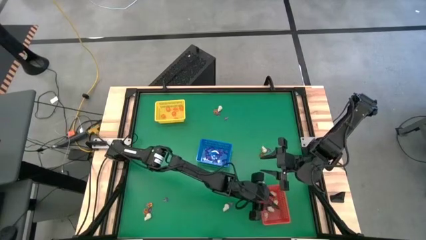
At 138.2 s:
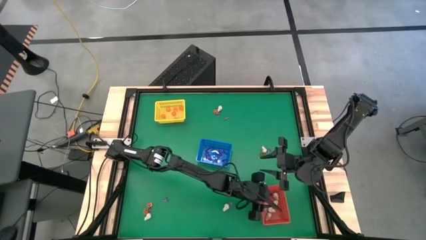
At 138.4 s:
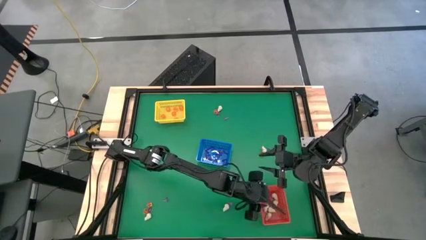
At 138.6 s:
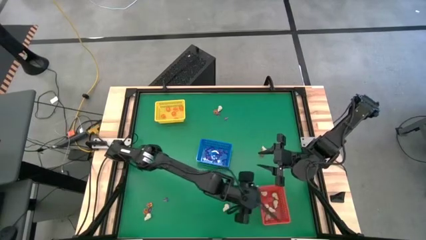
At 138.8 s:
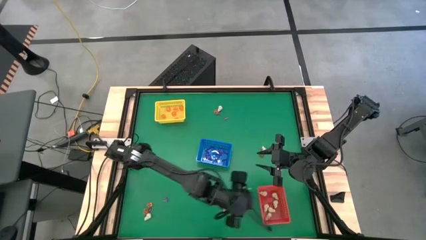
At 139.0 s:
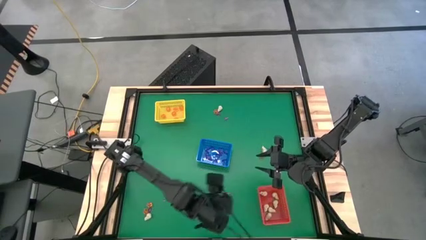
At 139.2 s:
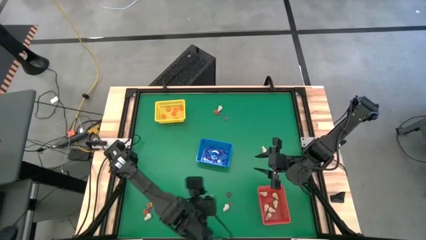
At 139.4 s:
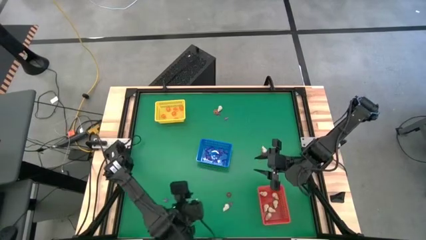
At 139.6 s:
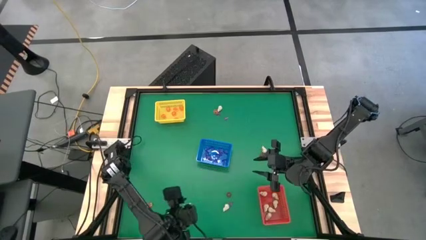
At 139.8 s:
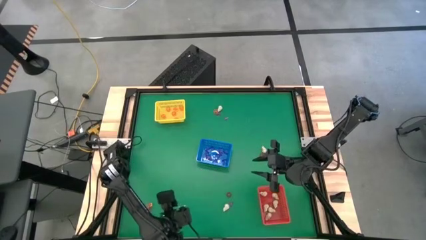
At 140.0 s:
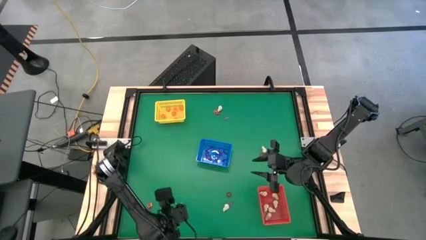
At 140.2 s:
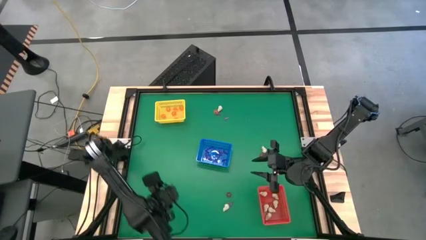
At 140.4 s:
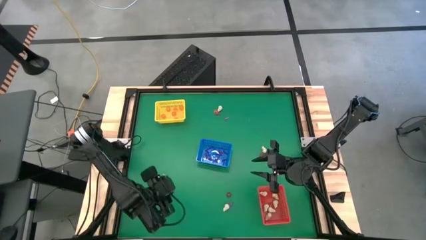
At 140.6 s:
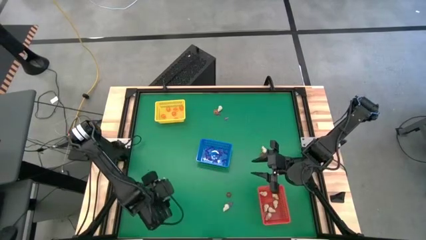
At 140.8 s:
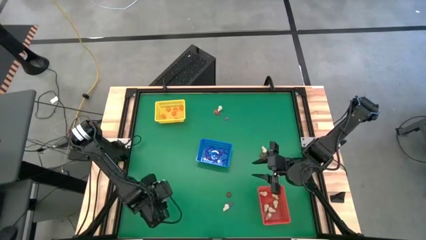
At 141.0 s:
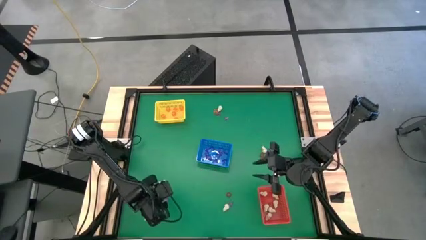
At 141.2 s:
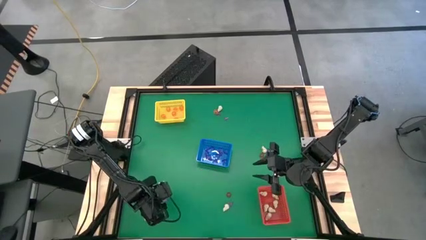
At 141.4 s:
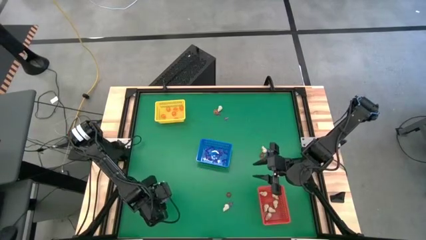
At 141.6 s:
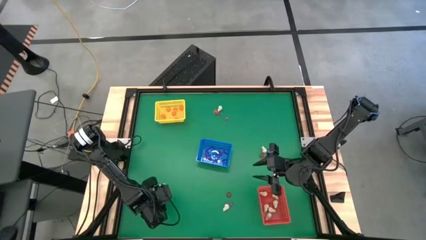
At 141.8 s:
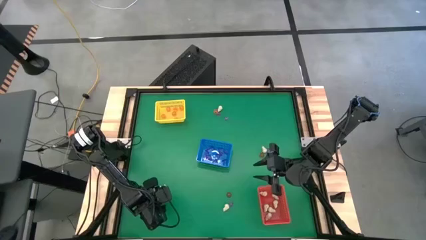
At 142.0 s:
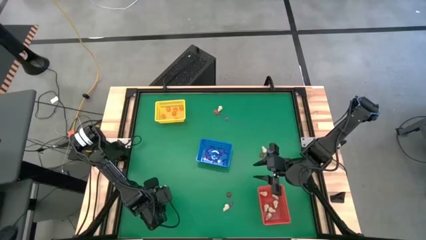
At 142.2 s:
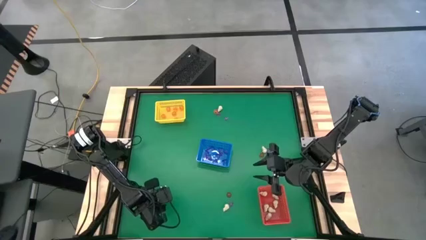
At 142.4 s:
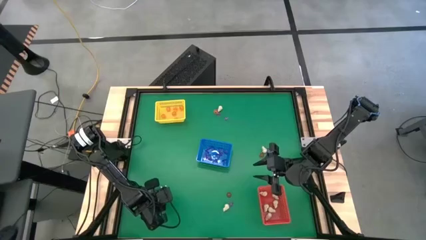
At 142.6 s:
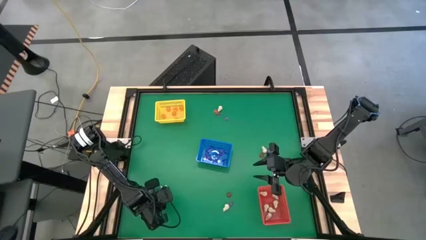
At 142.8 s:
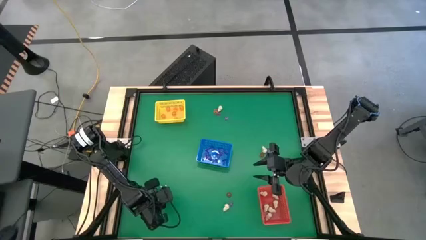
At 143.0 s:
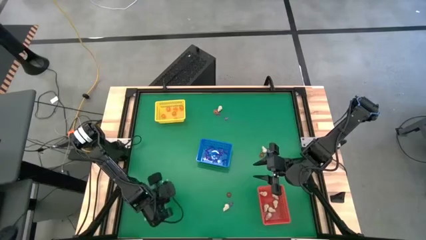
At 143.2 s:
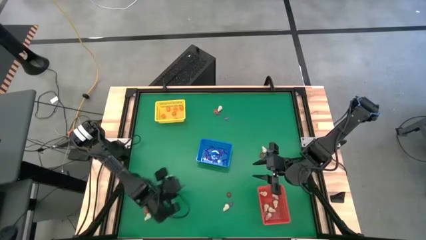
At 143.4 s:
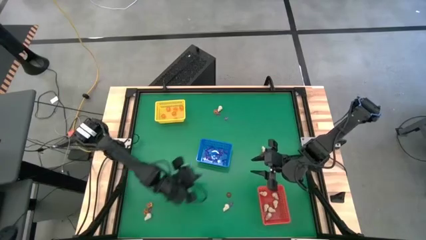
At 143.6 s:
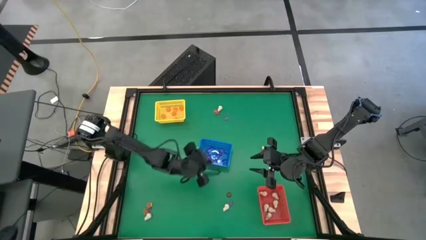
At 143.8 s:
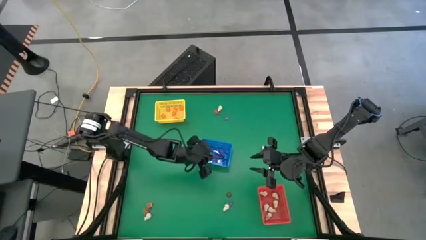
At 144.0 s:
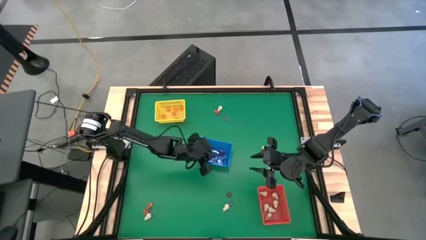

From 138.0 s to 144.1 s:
Task: Sort Halloween decoration
Put the witch hat toy into the blue bin

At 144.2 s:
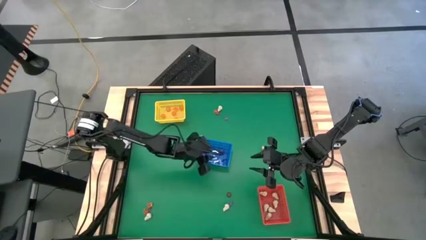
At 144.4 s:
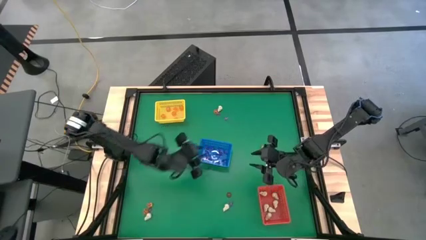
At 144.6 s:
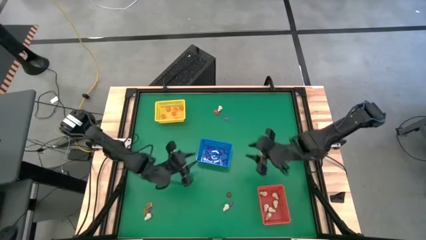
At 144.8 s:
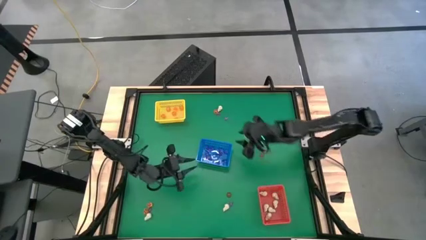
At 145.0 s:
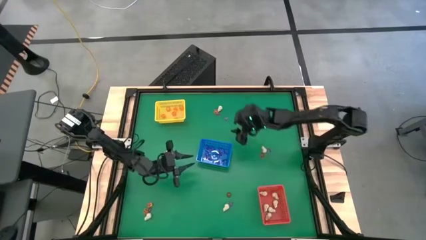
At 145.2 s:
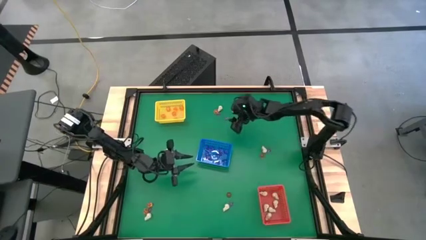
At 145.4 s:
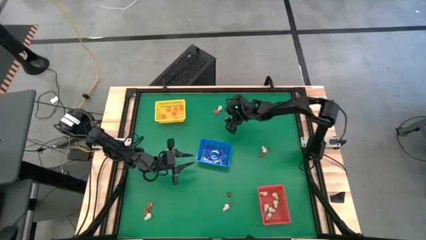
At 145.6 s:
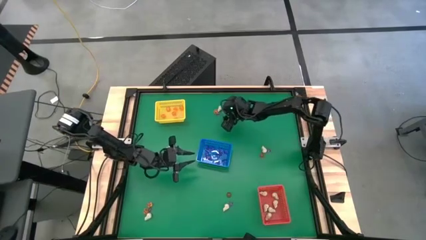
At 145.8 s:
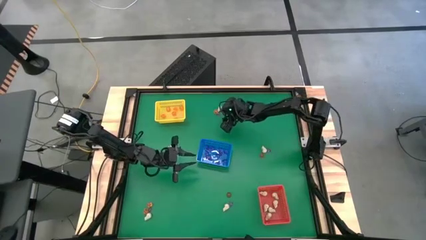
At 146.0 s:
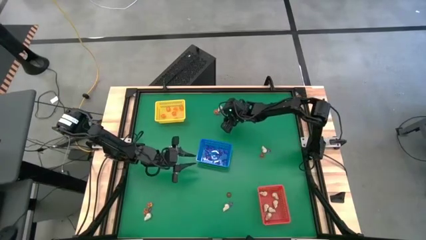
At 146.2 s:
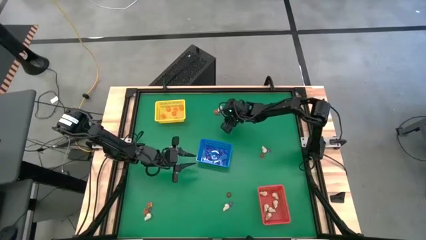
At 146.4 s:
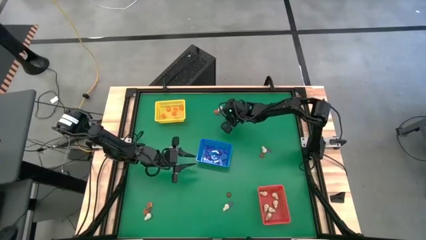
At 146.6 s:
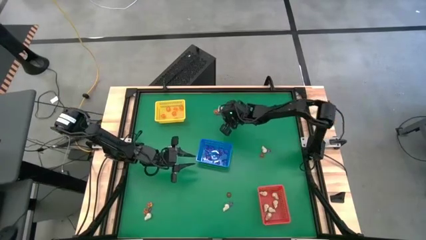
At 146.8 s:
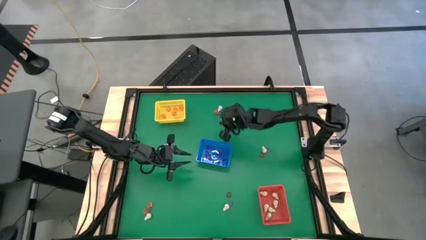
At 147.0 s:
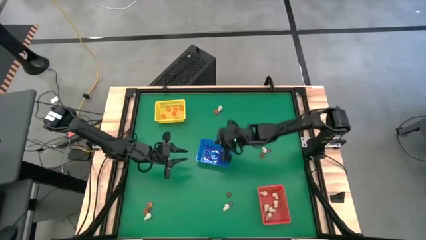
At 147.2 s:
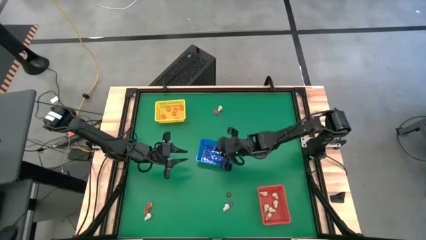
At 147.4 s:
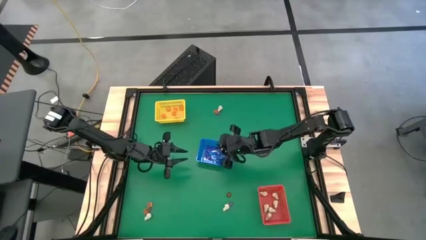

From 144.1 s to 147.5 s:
Put the witch hat toy into the blue bin

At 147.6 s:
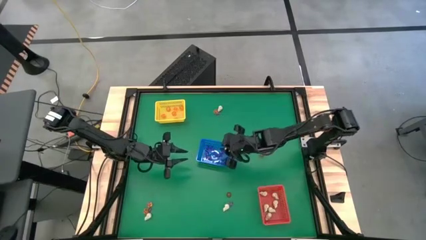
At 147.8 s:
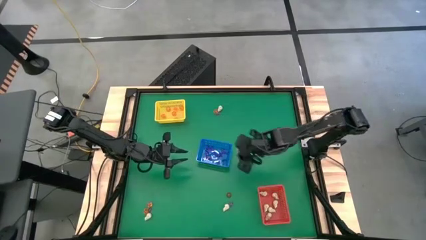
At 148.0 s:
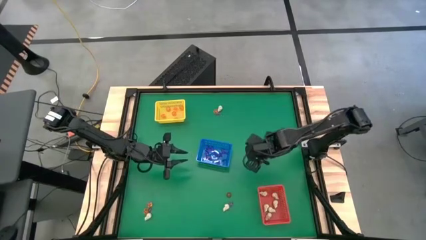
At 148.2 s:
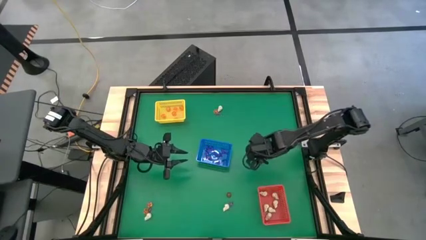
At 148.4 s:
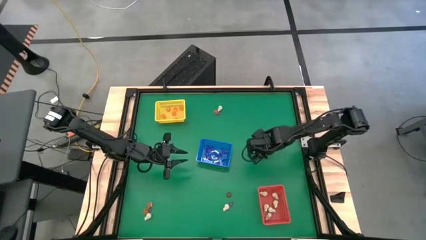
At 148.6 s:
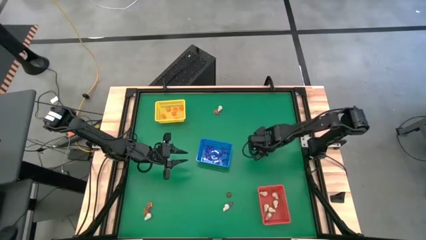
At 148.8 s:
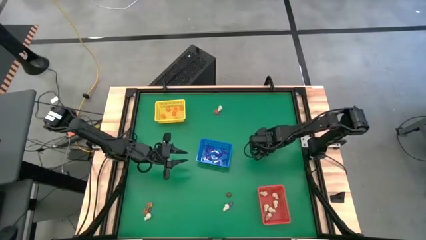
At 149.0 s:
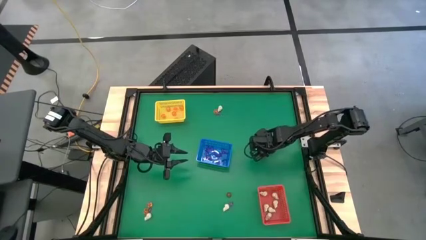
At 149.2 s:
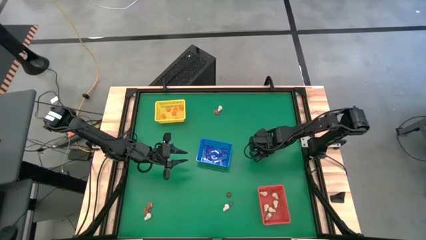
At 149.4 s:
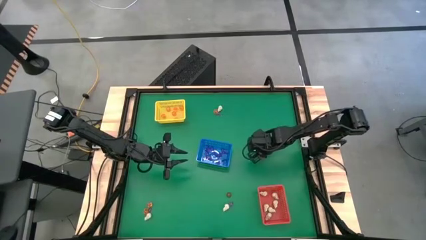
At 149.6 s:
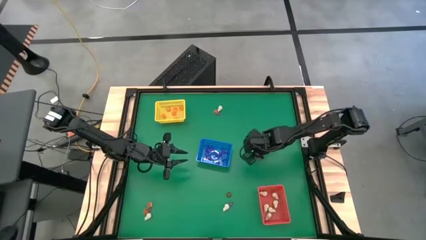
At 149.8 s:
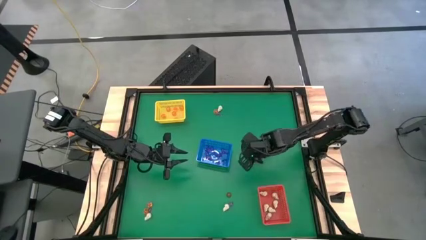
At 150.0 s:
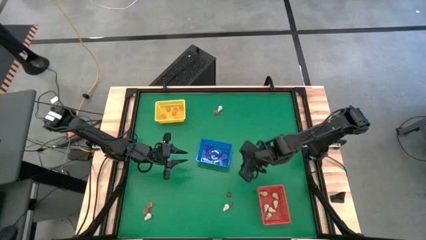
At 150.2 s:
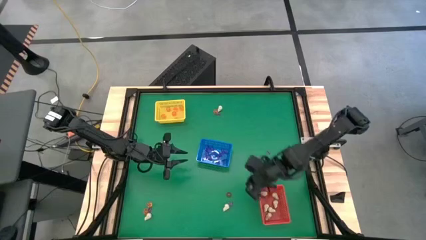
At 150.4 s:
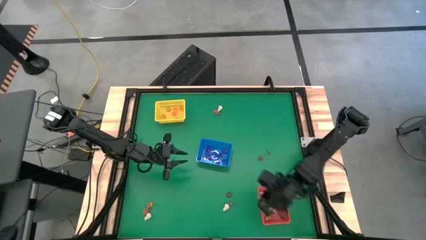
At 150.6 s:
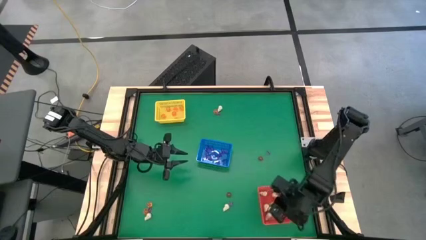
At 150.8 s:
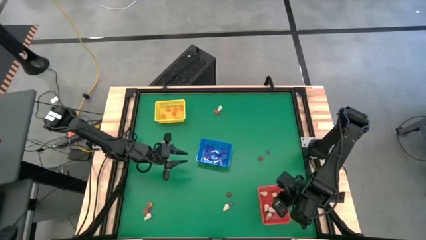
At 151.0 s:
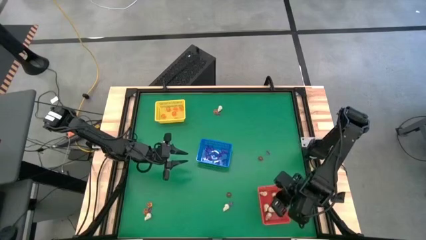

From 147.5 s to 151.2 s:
Put the skull toy into the red bin

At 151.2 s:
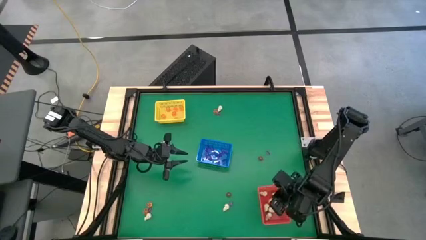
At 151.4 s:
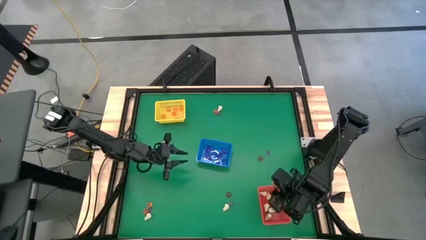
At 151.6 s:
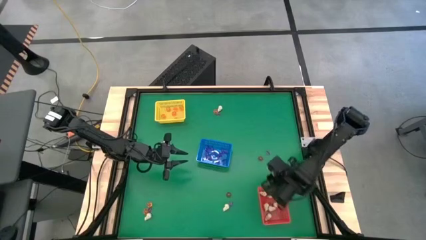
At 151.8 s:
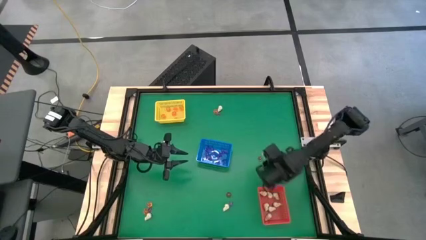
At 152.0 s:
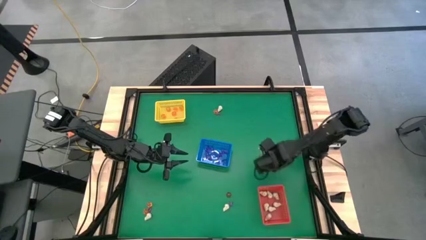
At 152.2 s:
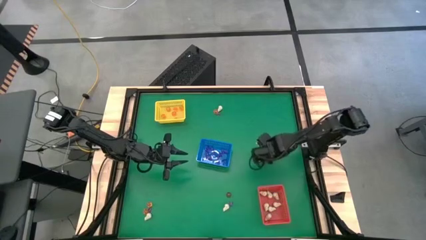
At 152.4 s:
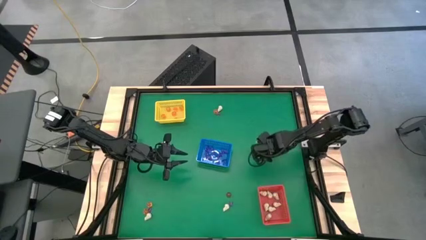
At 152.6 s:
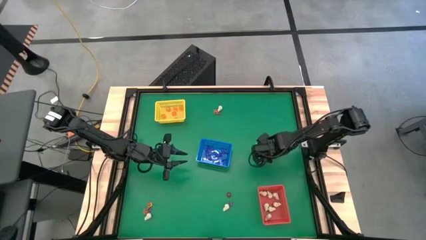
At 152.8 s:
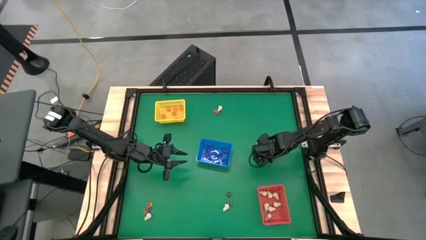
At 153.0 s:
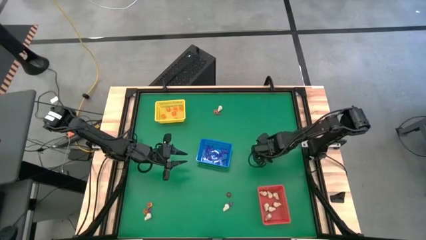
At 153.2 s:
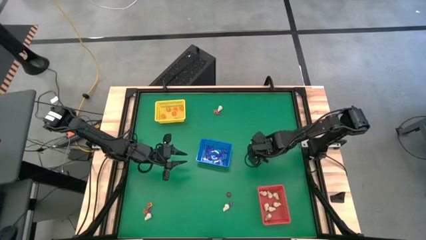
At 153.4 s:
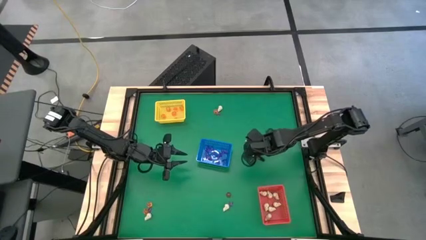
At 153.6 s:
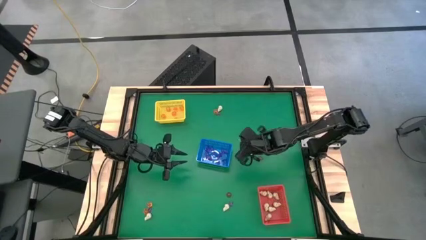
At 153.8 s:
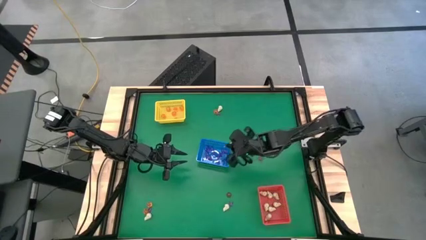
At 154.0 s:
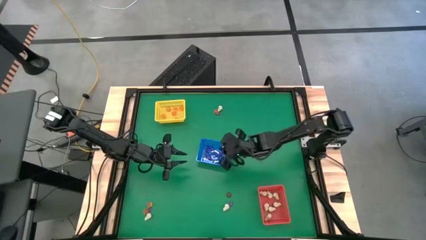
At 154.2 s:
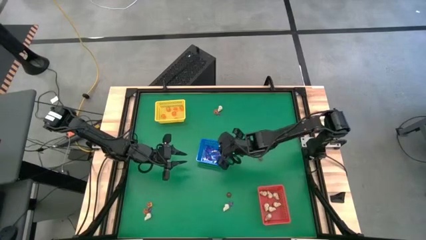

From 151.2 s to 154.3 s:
Put the witch hat toy into the blue bin

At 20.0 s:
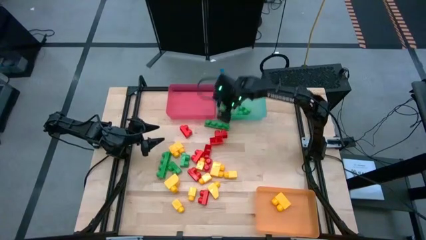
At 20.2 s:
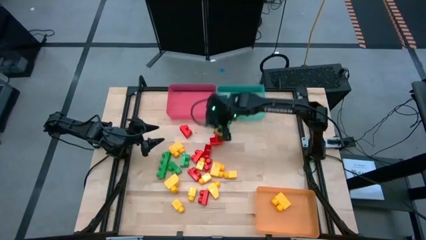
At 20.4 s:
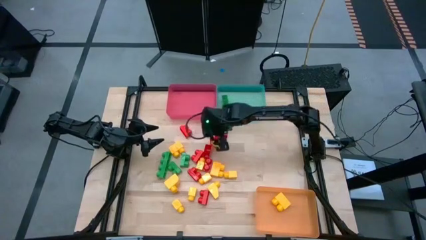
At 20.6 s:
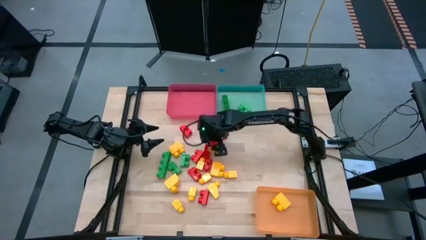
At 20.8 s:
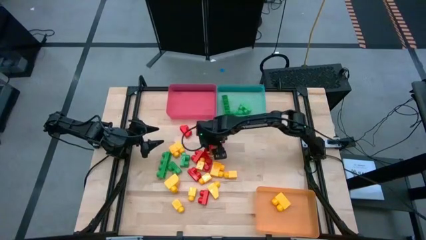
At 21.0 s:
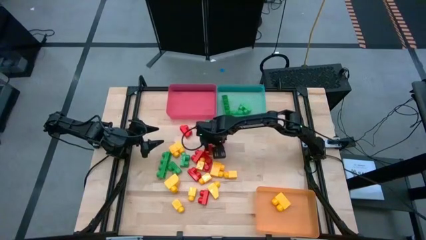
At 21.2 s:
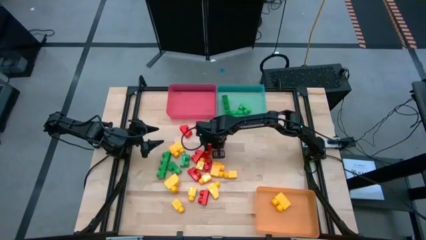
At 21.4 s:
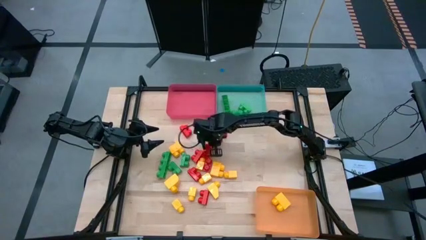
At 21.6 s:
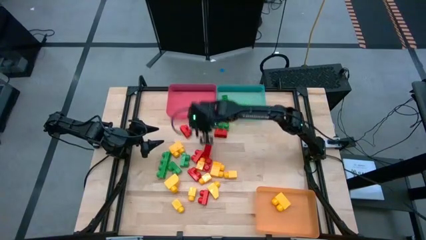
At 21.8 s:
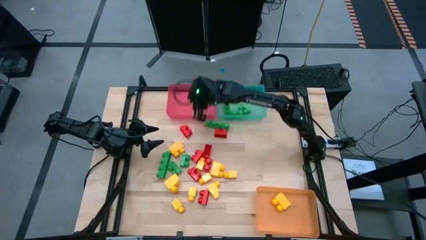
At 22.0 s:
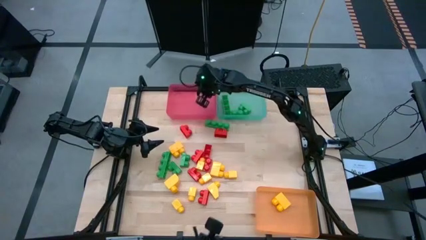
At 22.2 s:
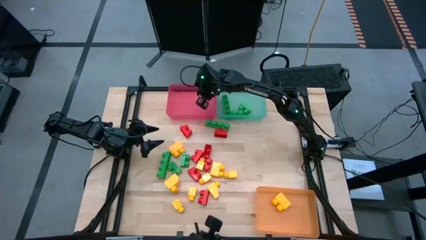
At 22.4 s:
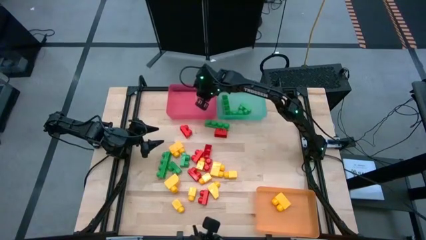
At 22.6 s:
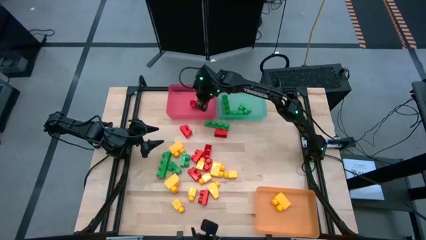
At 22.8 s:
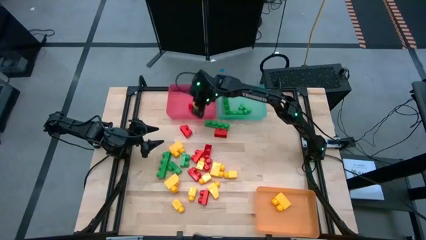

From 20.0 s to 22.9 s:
Task: Sort blocks
Put the red game piece into the red bin
